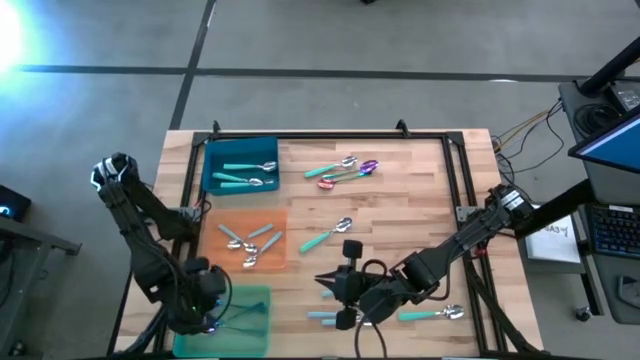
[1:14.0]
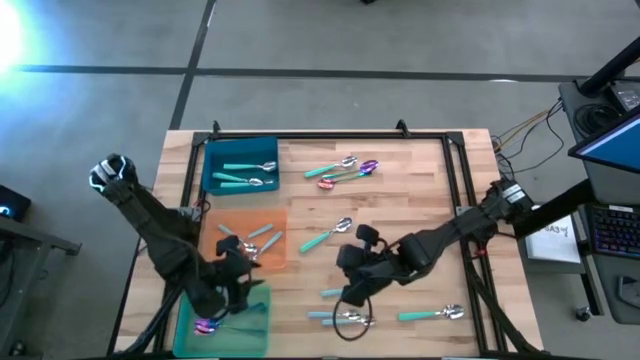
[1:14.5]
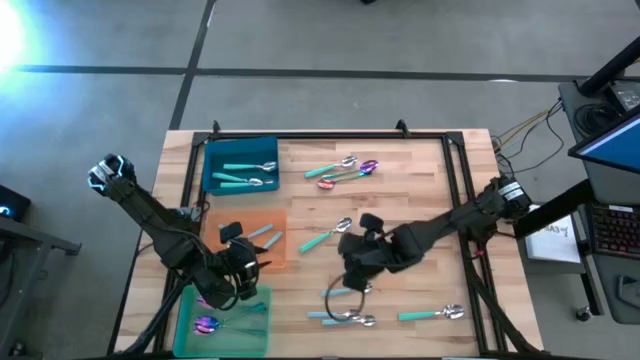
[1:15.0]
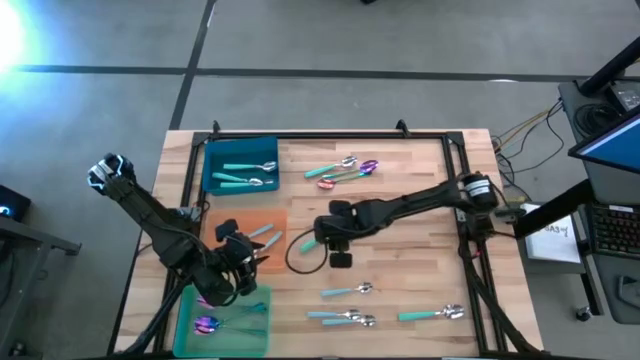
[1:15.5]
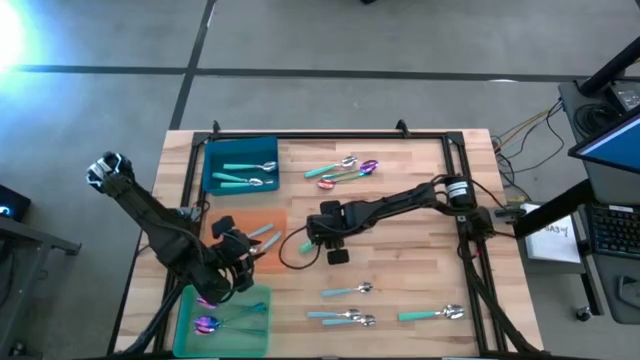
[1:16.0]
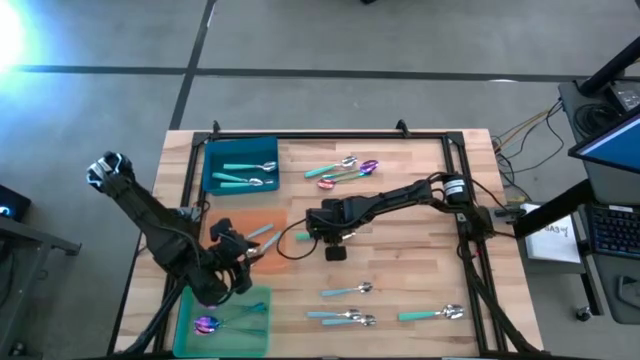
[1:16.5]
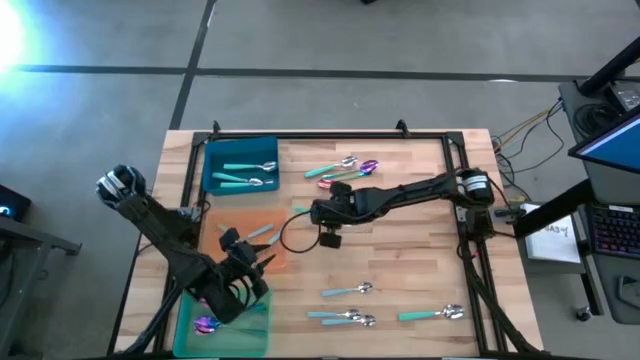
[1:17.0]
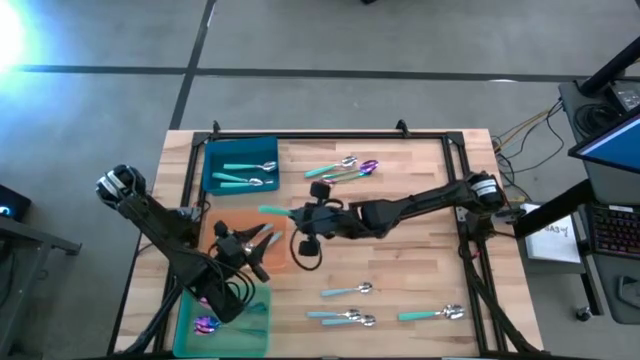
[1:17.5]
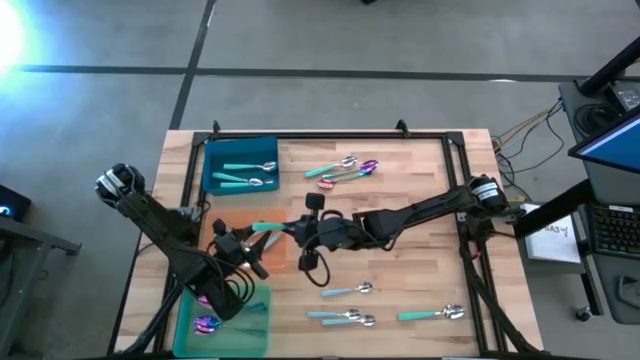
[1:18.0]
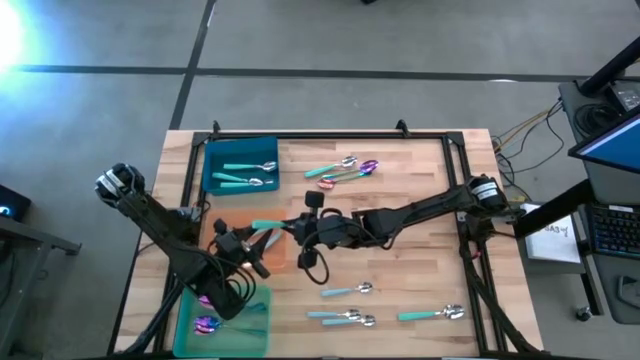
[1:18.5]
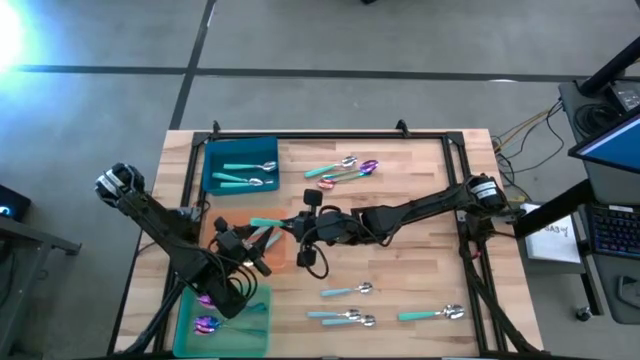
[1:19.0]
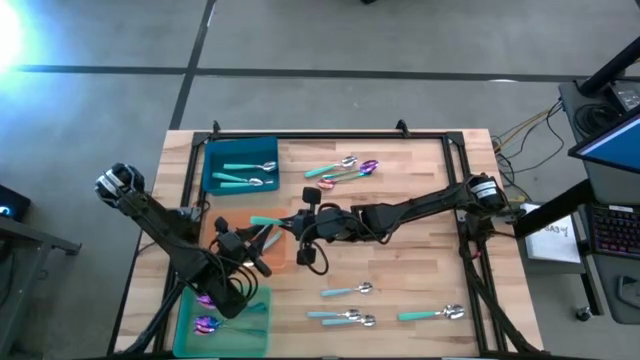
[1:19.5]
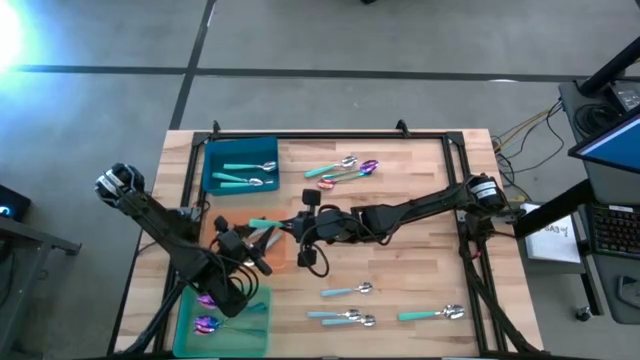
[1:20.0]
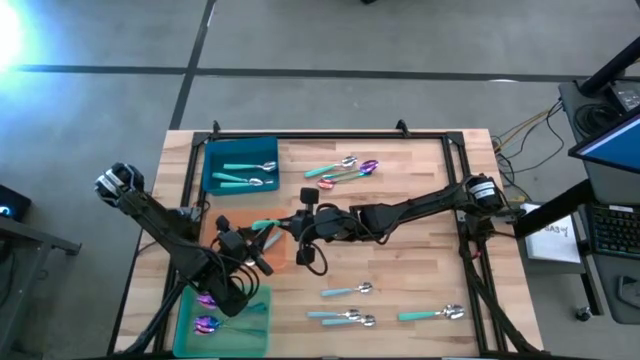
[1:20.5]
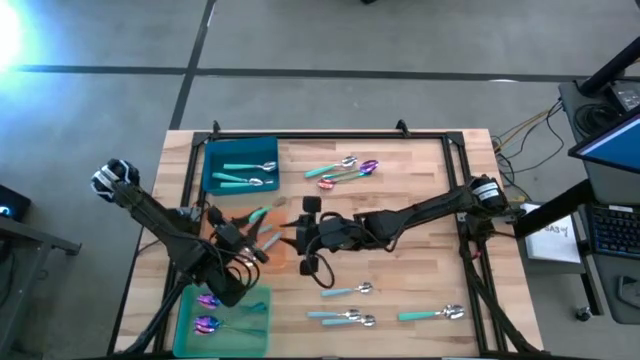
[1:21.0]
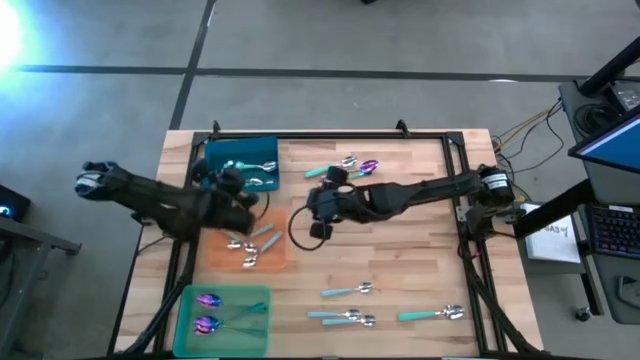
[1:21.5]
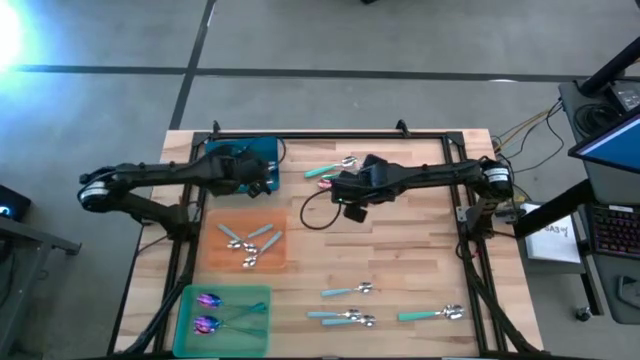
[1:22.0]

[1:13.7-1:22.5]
Task: Sort silverware by color (type)
Put the green spoon into the blue bin

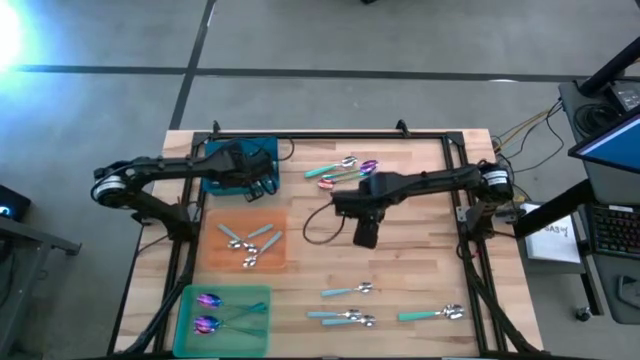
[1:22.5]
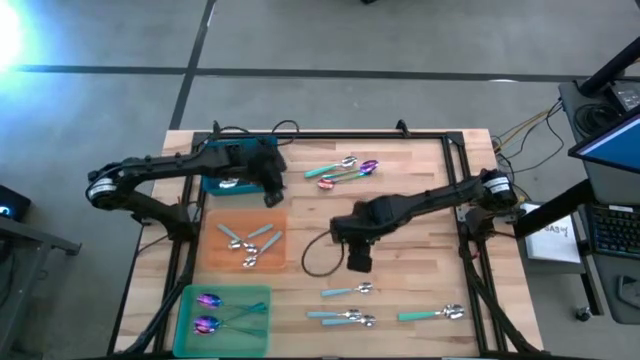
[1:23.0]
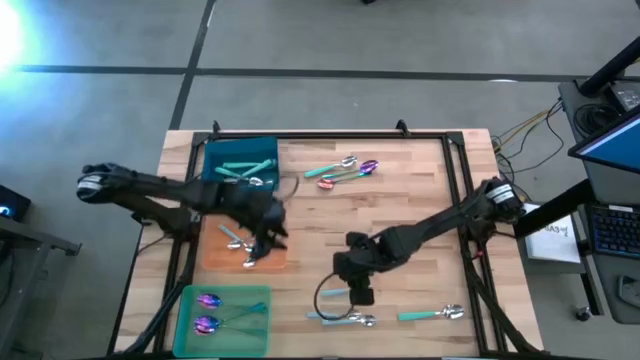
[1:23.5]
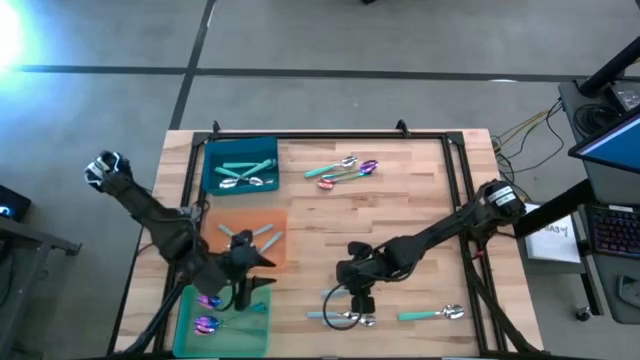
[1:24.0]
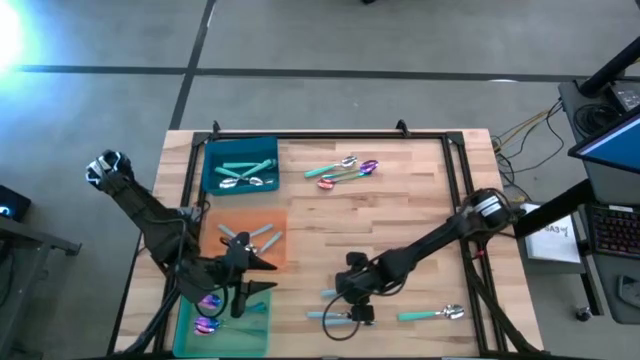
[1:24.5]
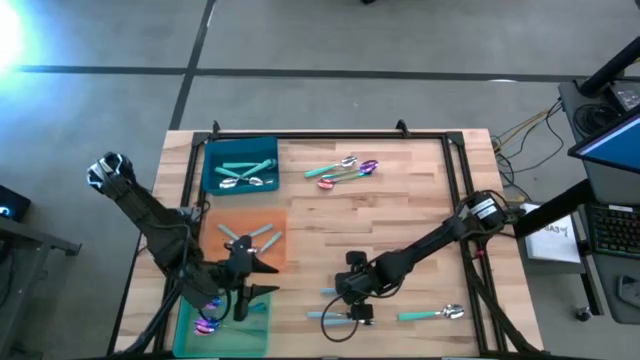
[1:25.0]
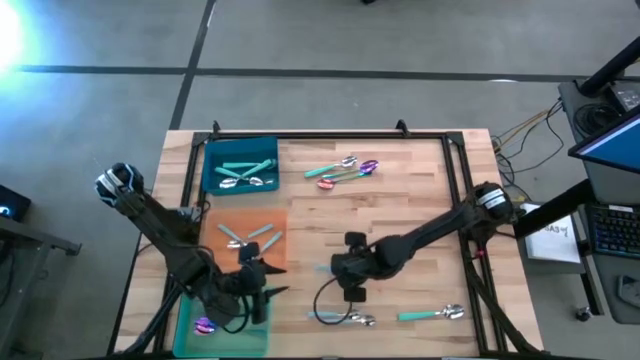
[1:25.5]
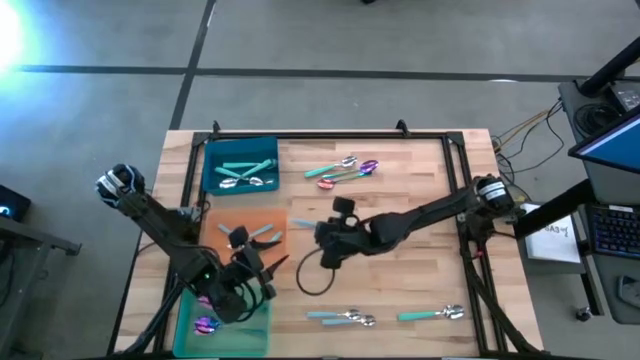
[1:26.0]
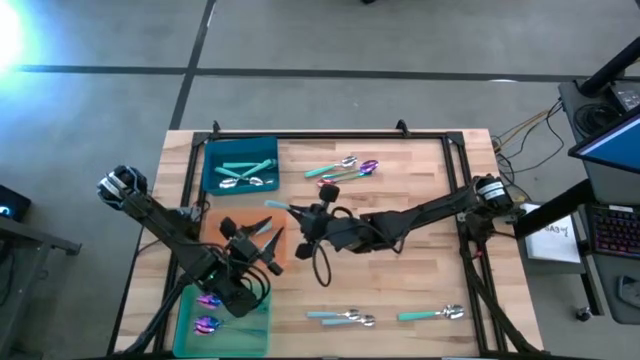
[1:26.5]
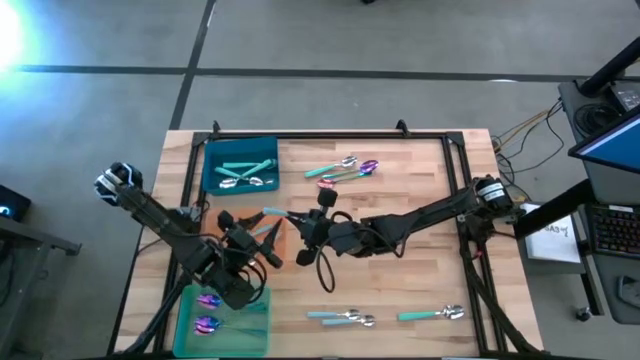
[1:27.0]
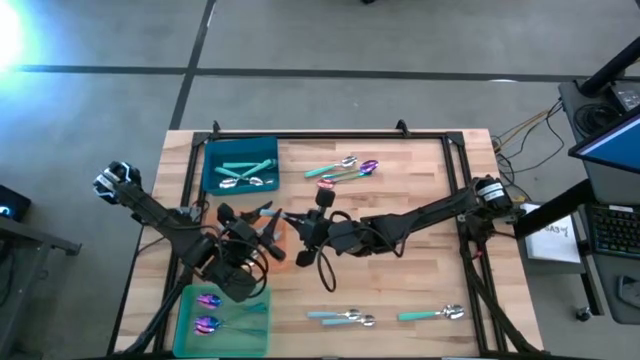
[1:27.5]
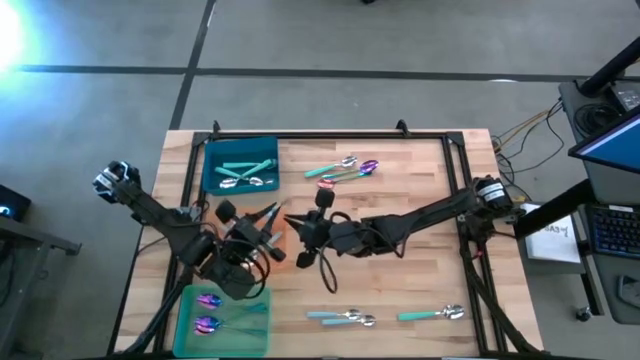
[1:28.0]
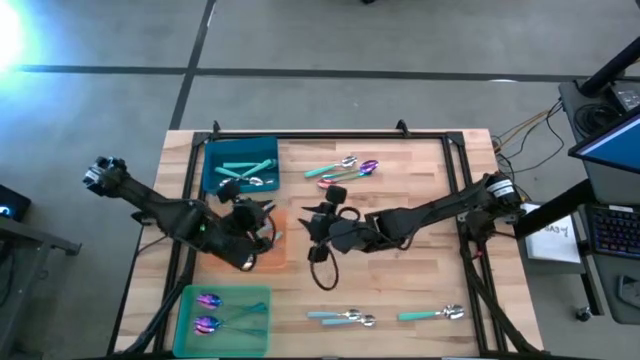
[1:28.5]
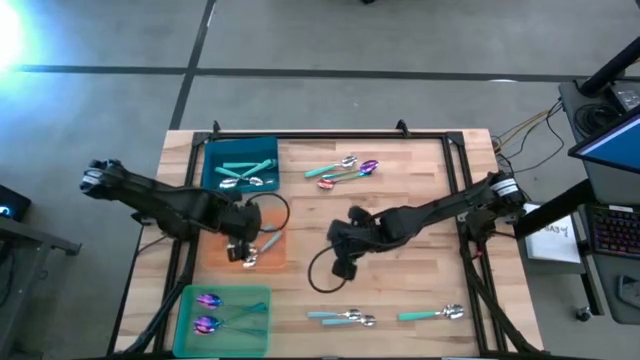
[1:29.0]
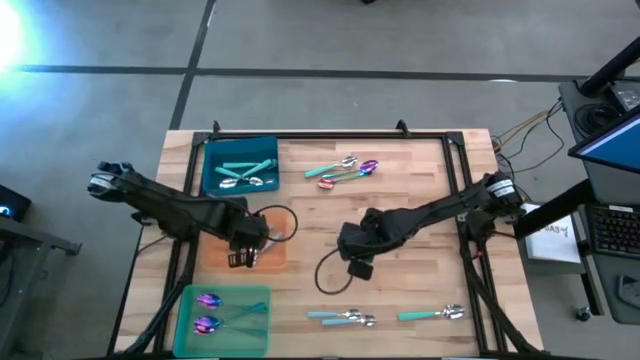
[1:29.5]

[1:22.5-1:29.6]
Put the blue spoon into the orange bin

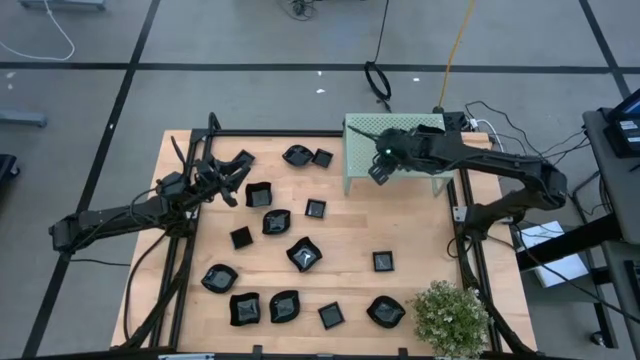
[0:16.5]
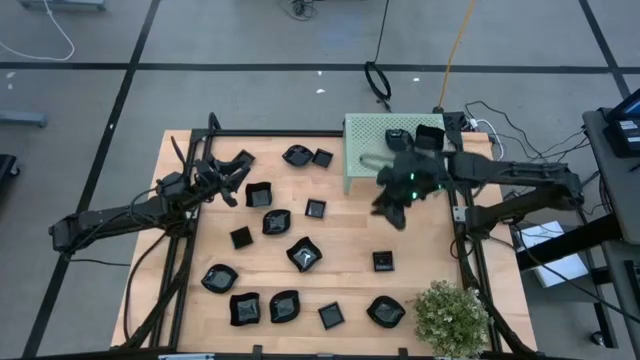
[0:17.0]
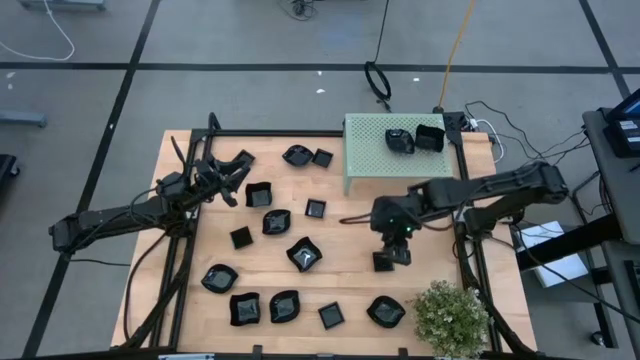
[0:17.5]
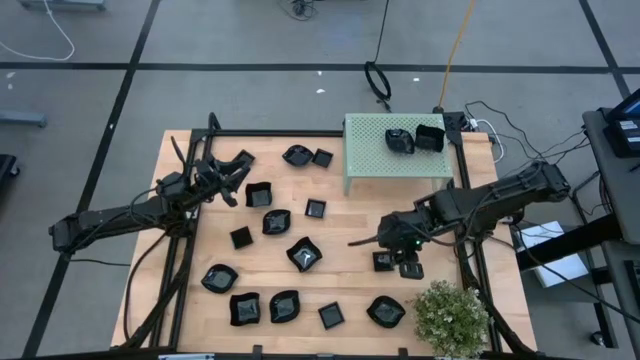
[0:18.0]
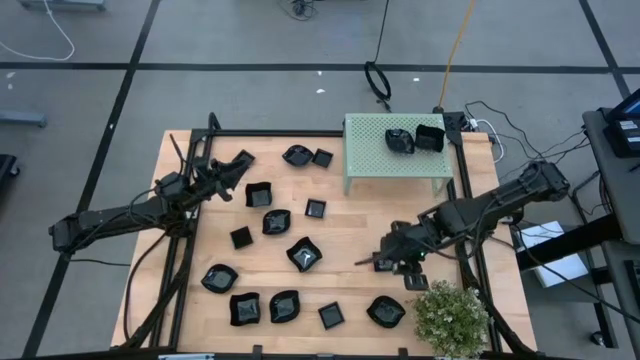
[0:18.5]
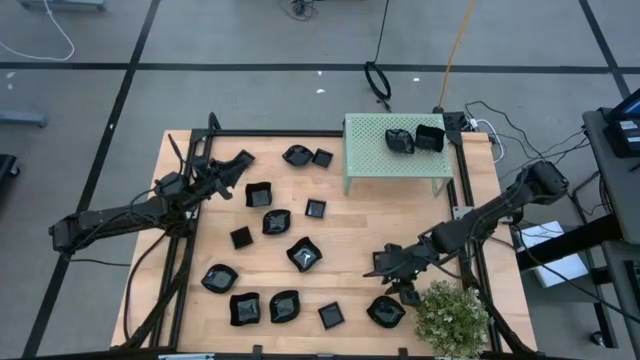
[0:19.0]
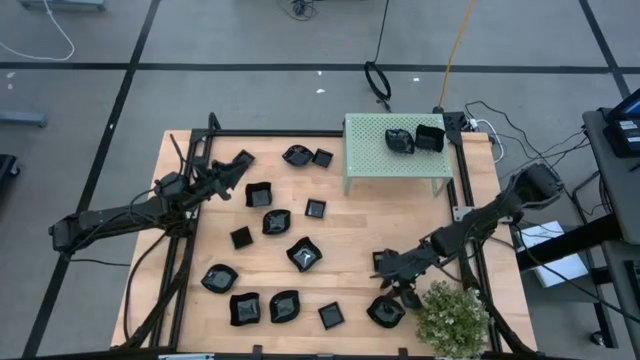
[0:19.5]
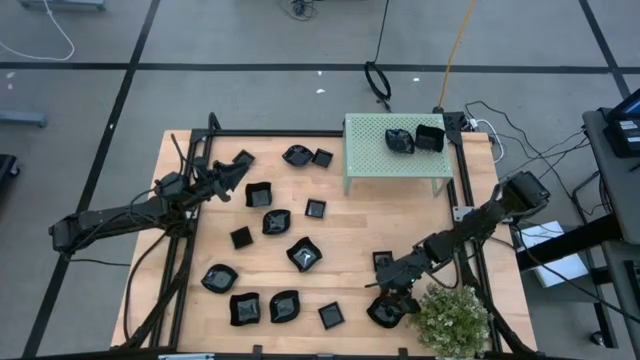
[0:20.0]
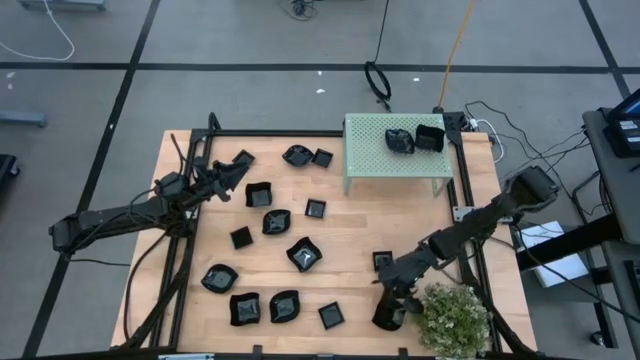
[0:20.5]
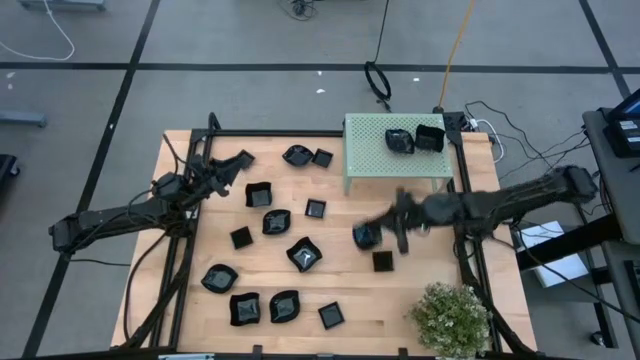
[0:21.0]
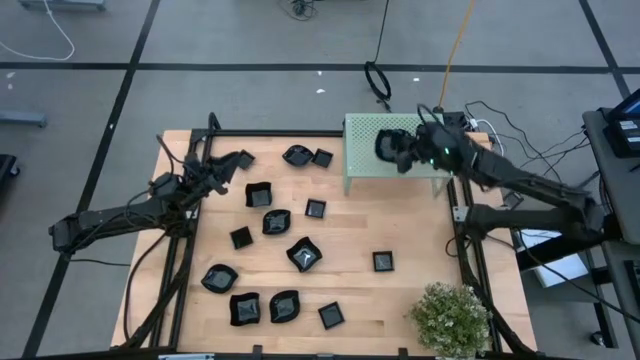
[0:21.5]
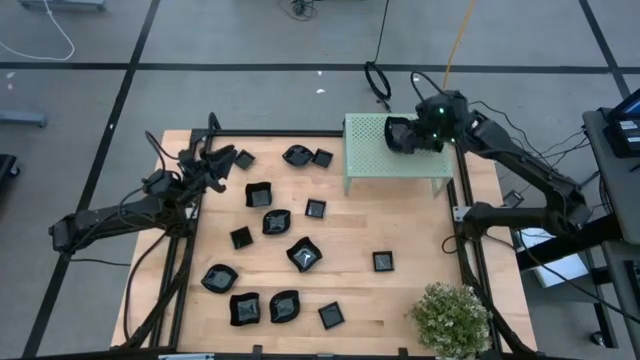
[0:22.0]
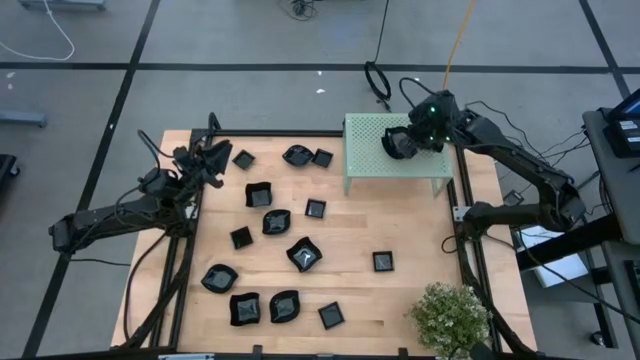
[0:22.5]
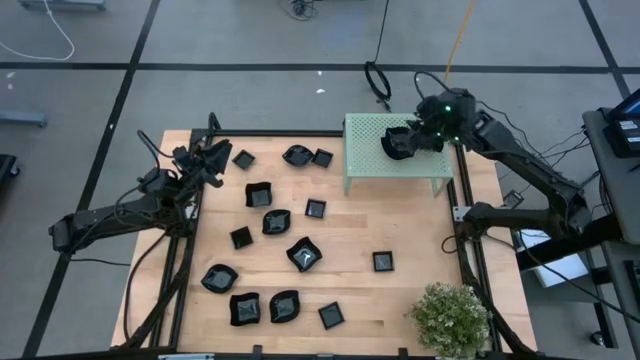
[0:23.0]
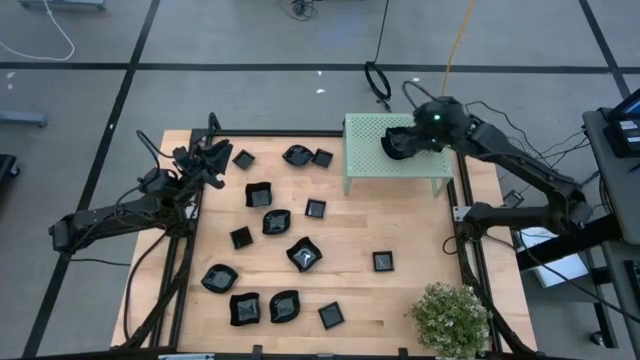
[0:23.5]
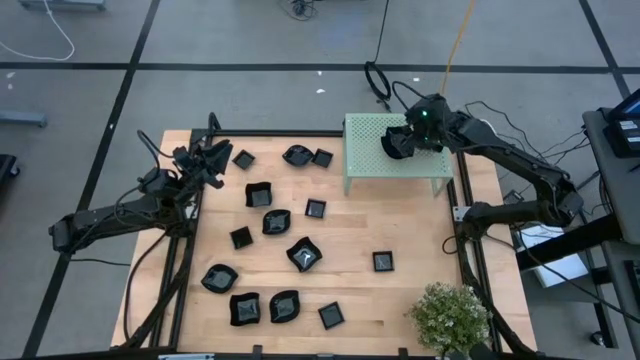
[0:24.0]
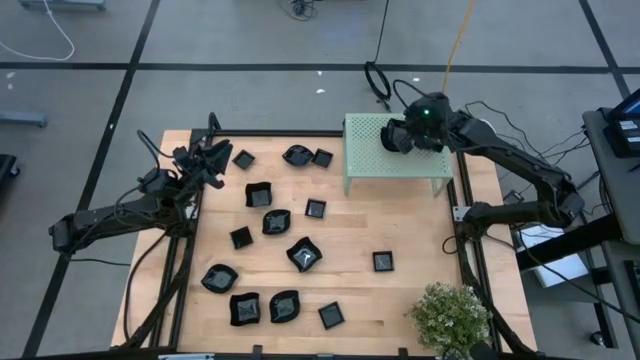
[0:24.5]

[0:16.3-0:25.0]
Task: Pick & Place Mini shaped plates
Stack the leaf-shaped plate on top of the leaf-shaped plate on the shelf
